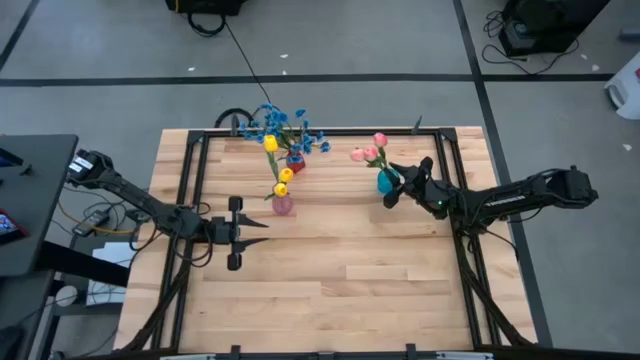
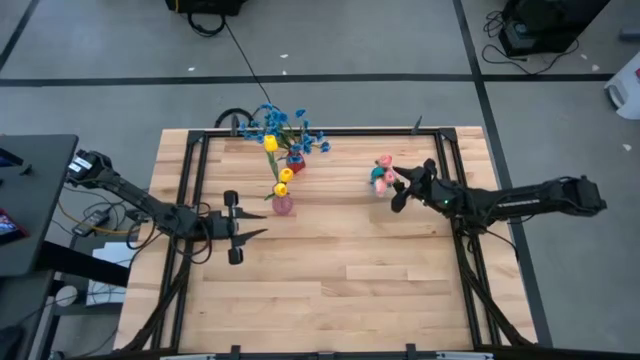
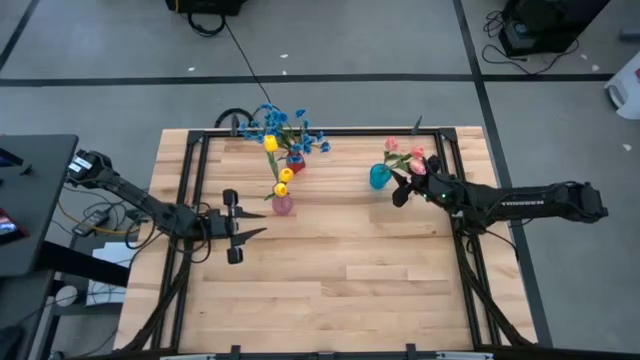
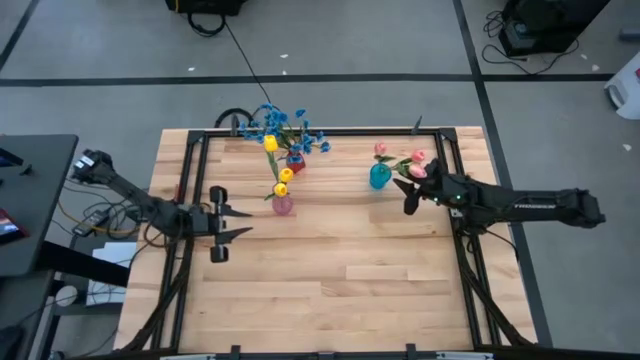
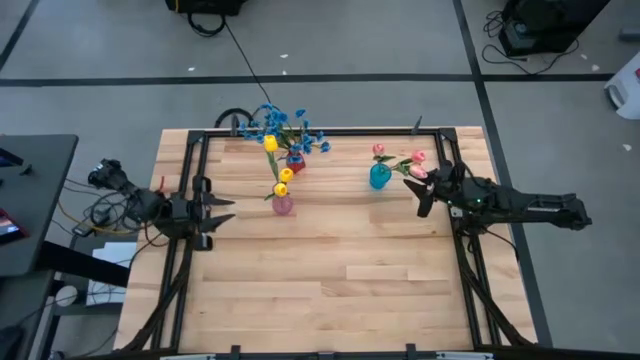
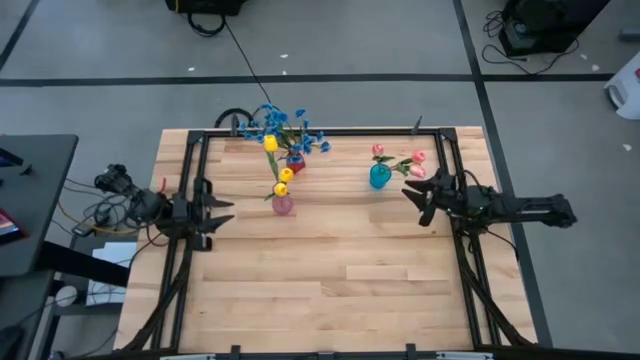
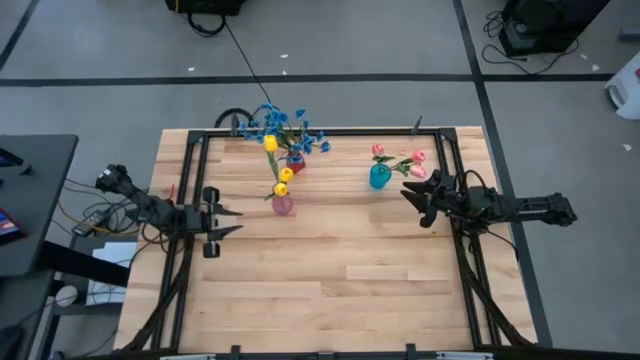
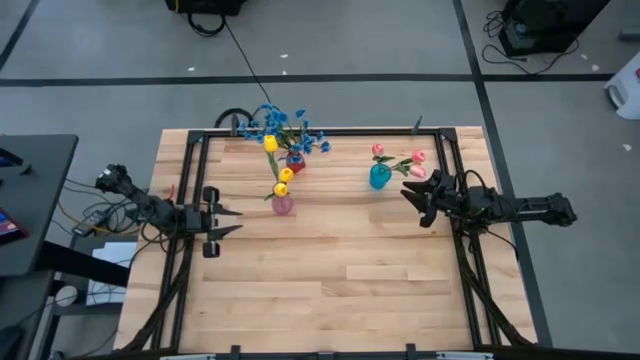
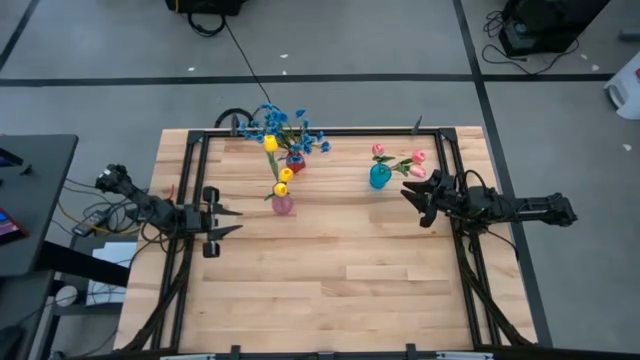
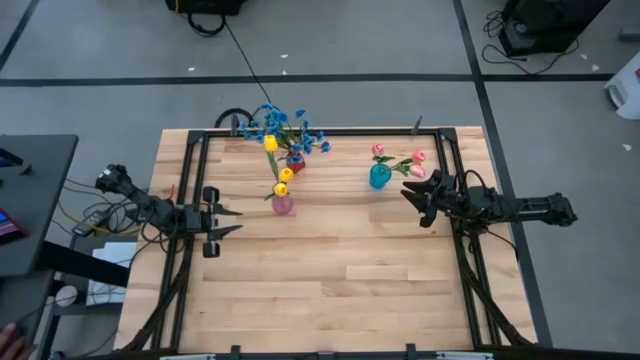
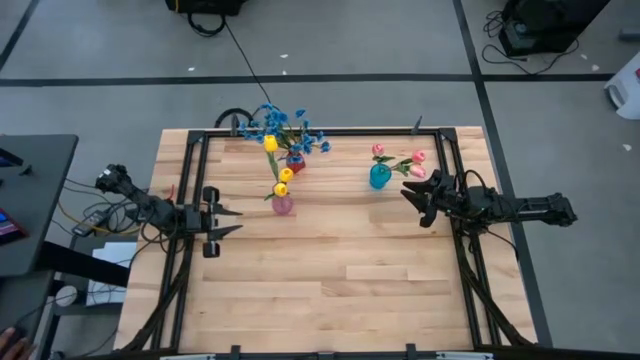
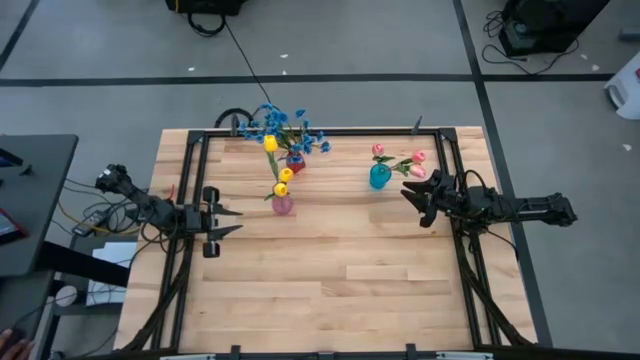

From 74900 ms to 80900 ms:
Task: Sort flowers into vase by color
Return to Home Position

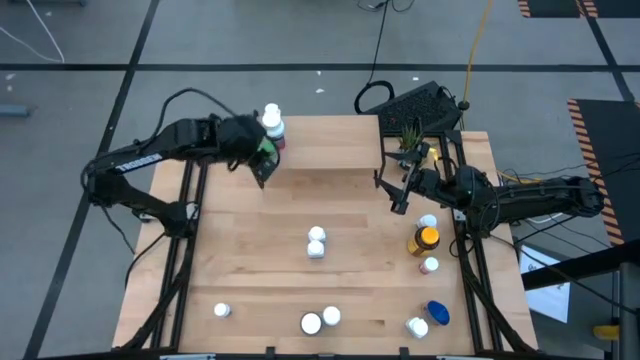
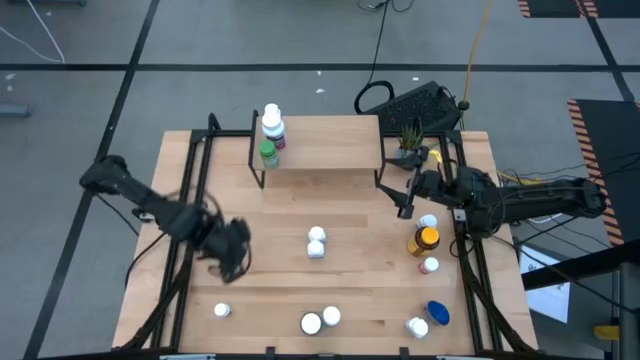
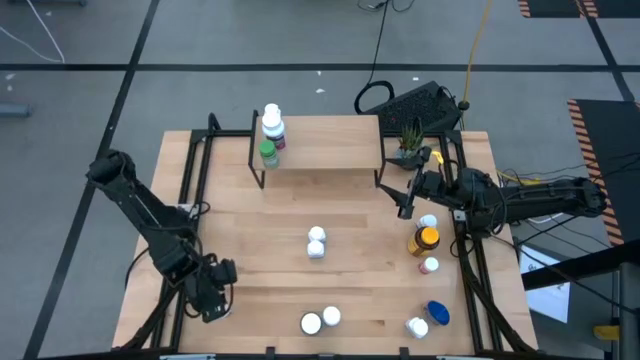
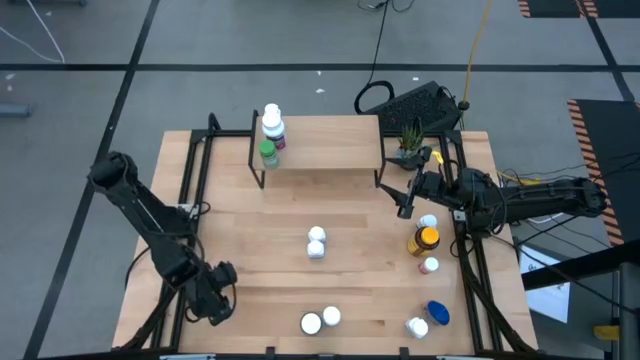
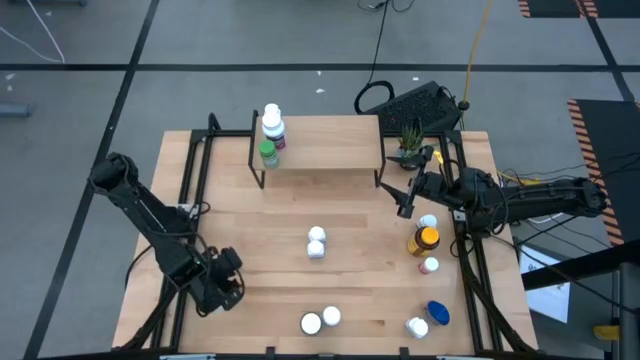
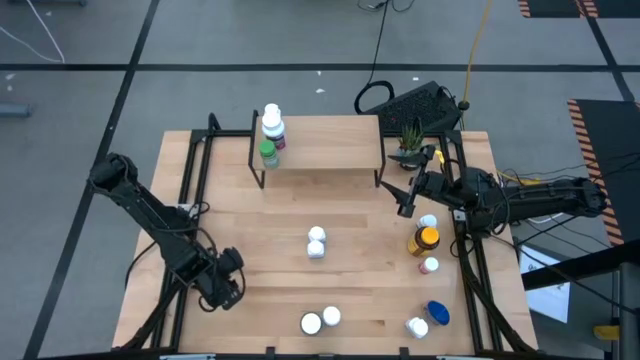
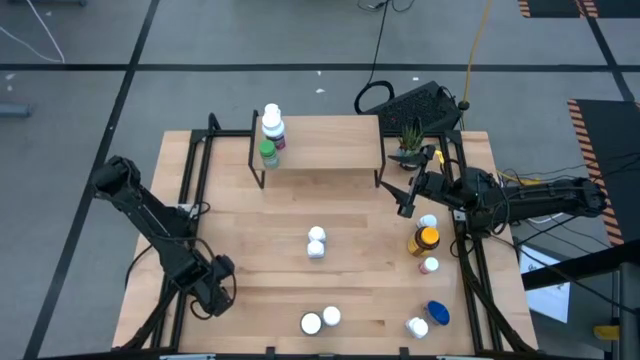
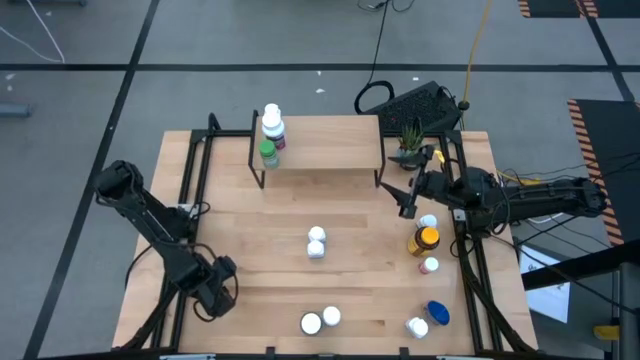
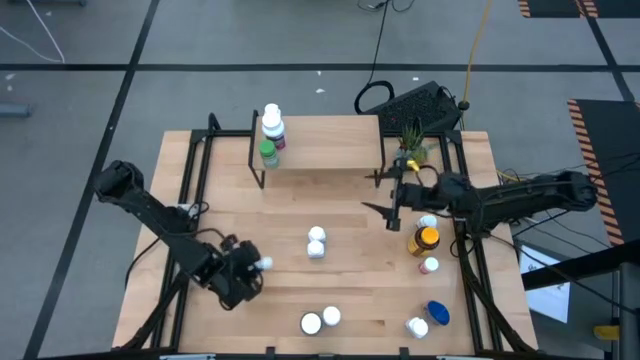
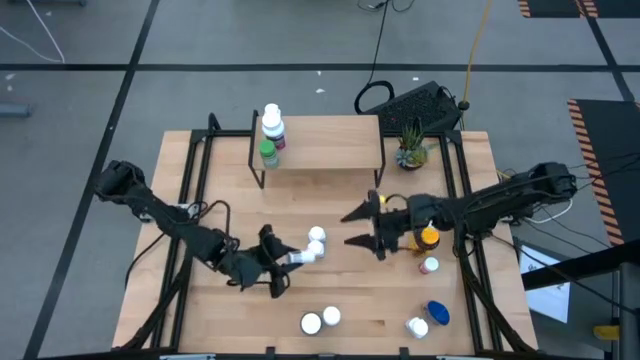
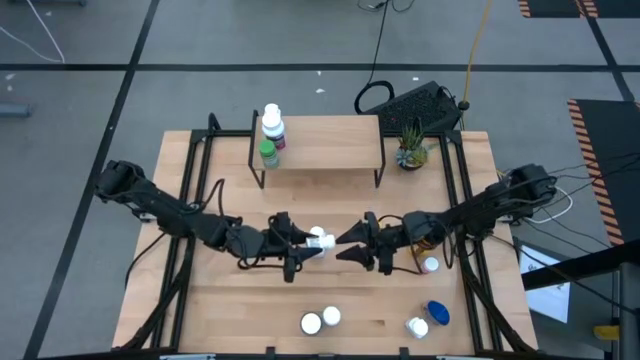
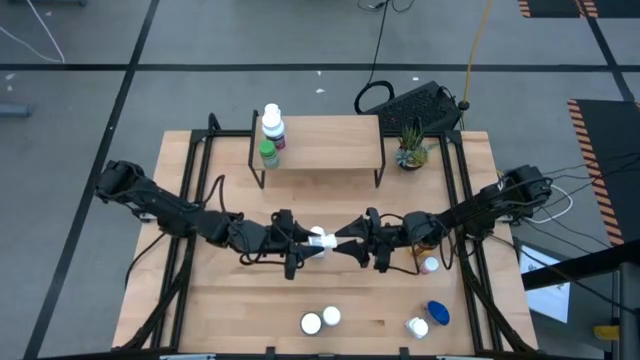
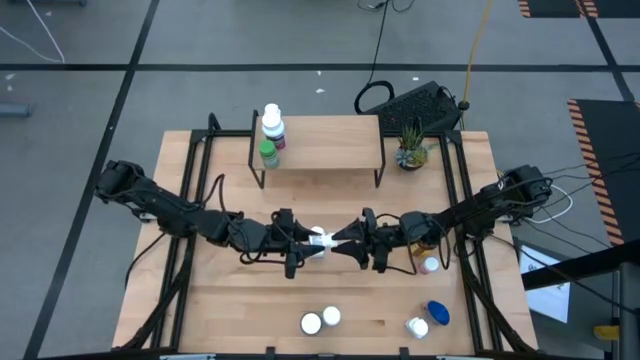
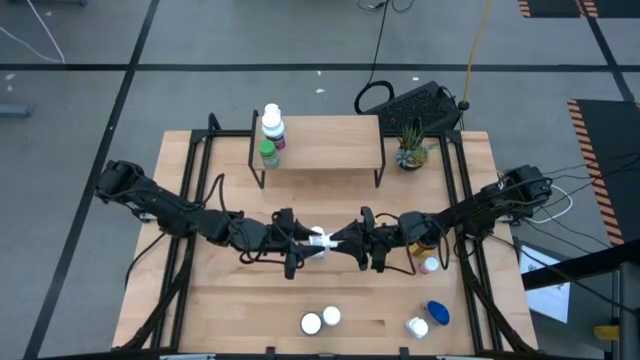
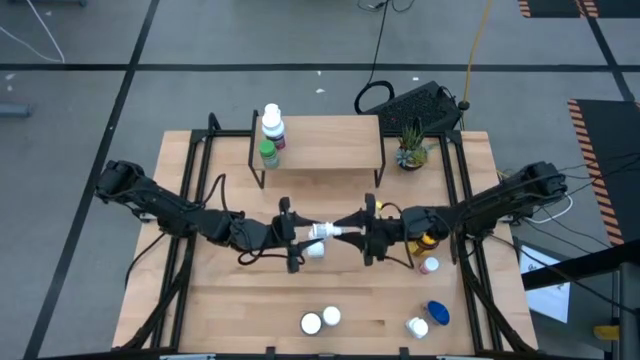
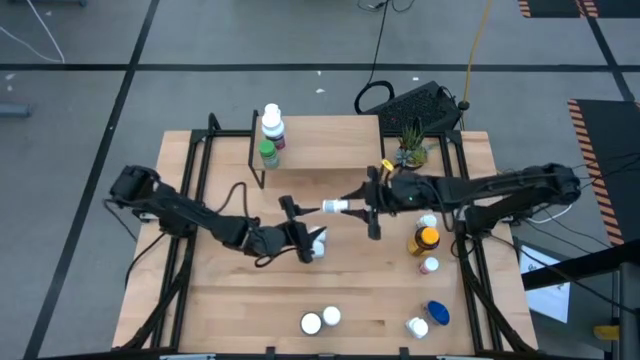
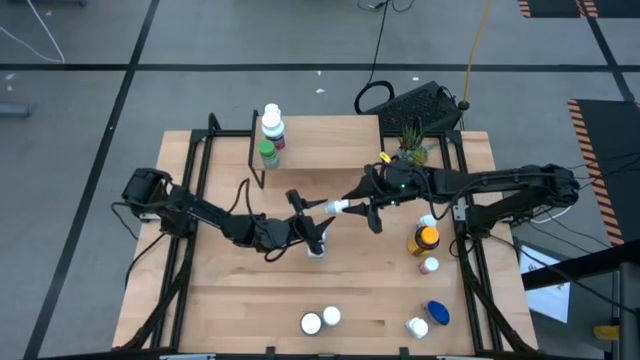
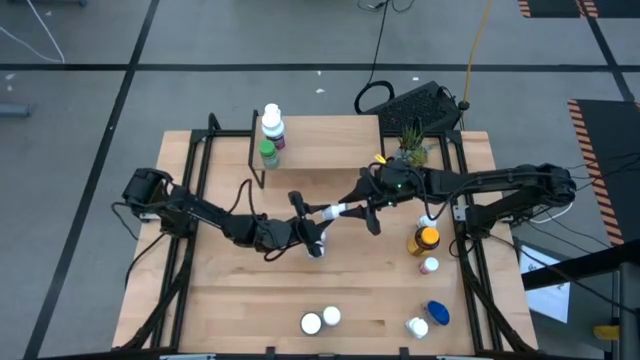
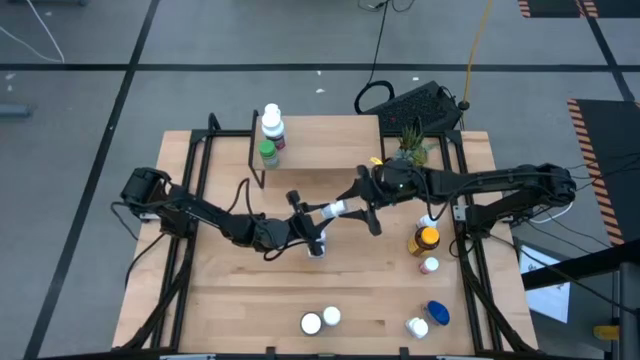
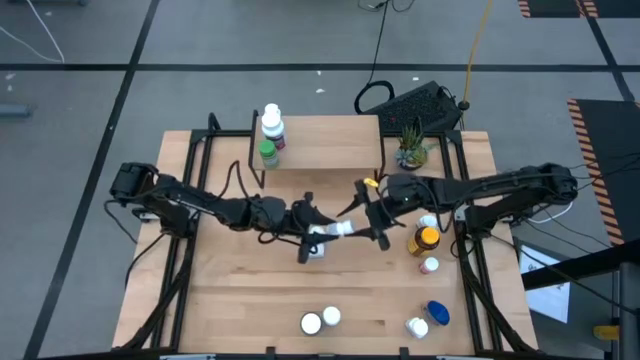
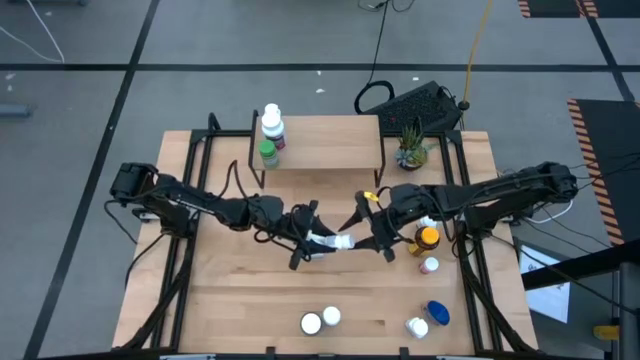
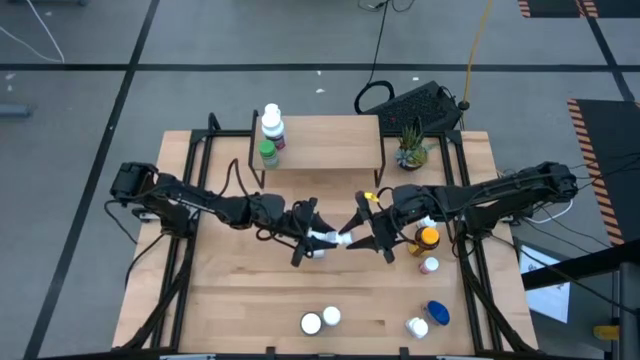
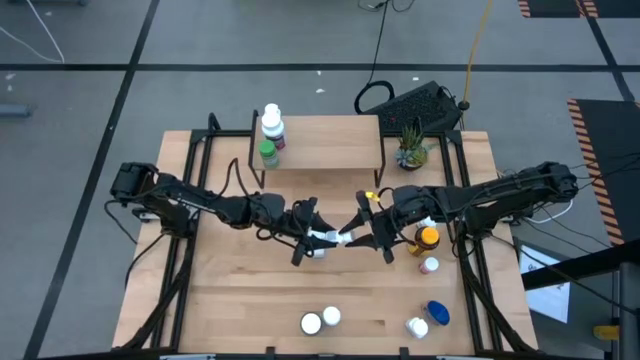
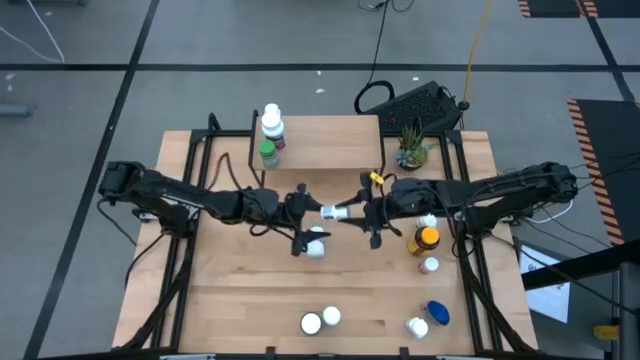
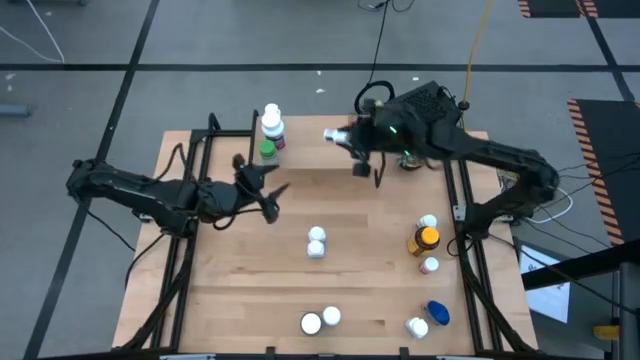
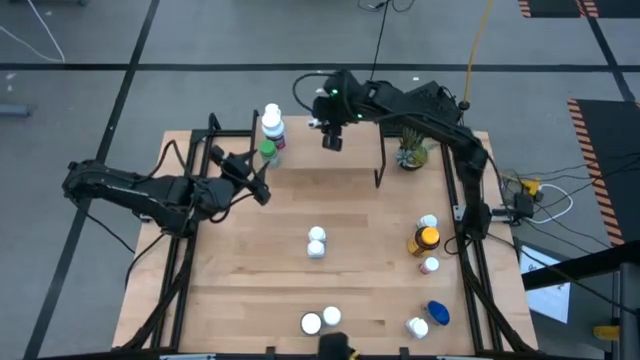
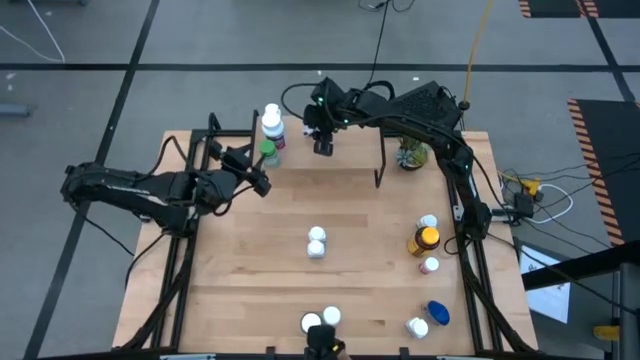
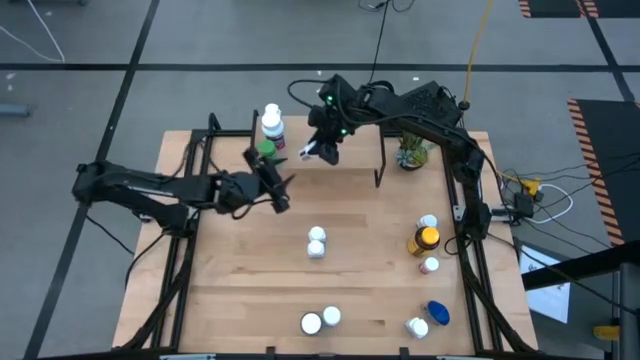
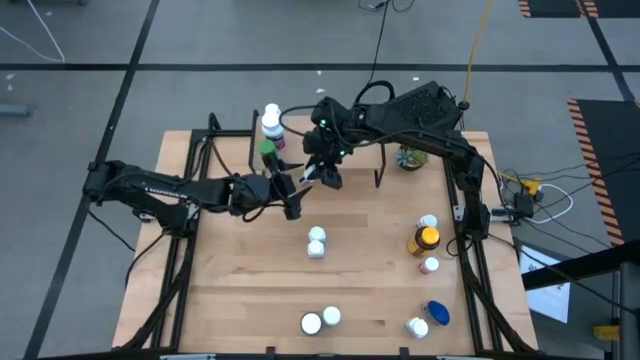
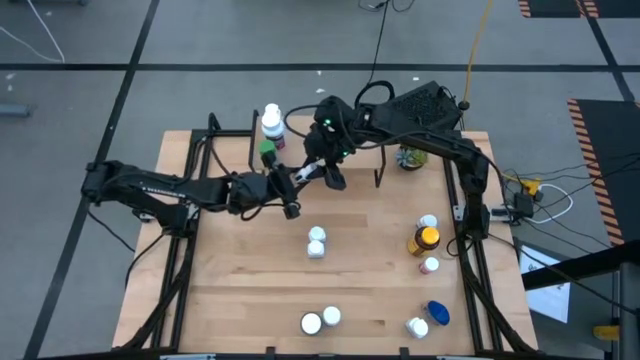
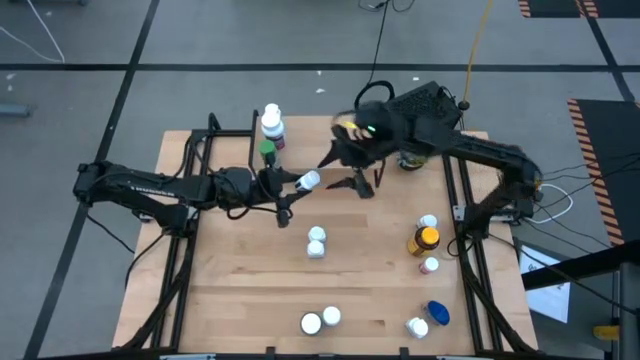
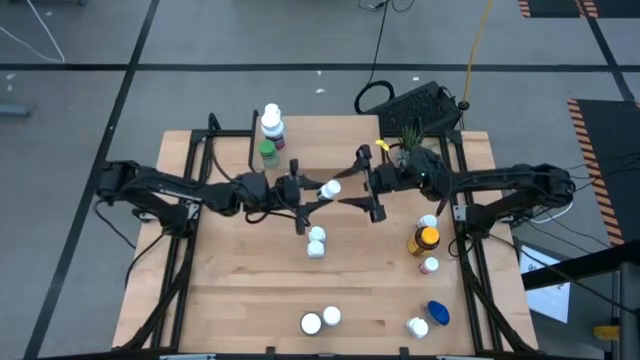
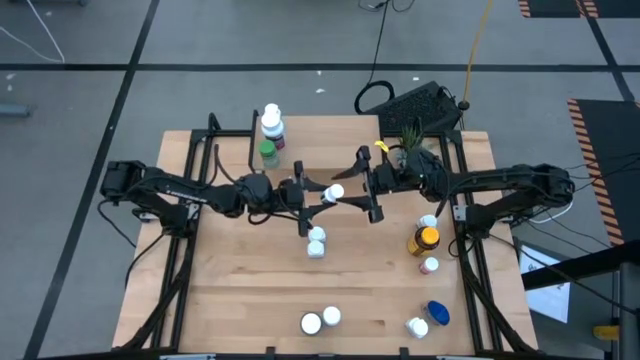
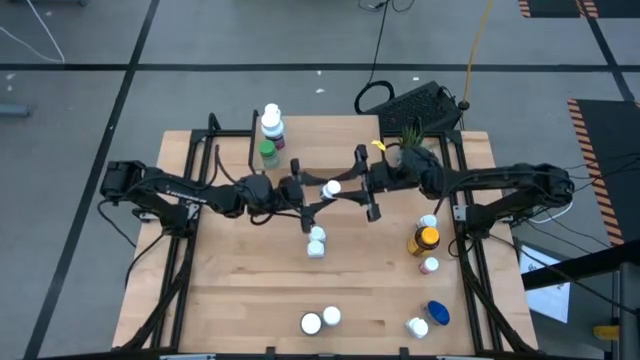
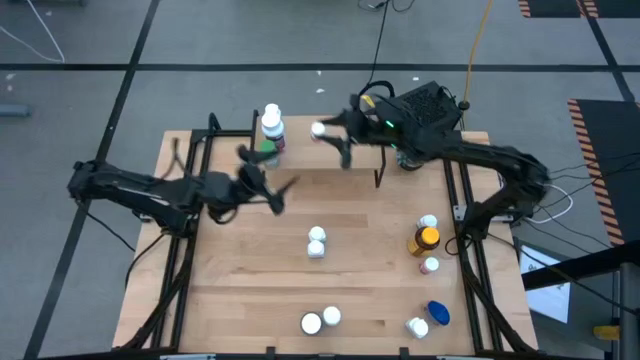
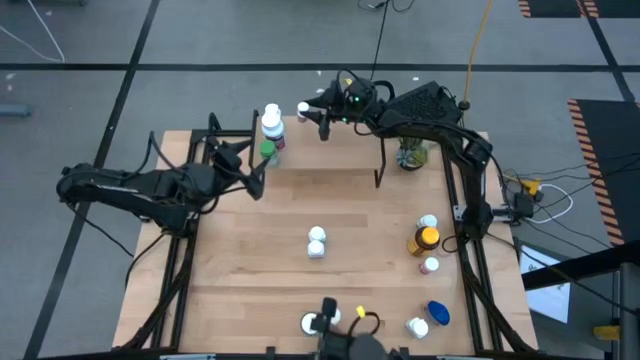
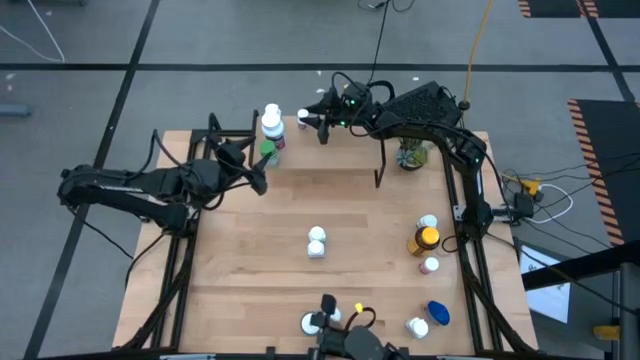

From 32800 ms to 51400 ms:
Task: Pick and place medicine bottles onto shelf by color
Put the white and black pill bottle on the shelf
